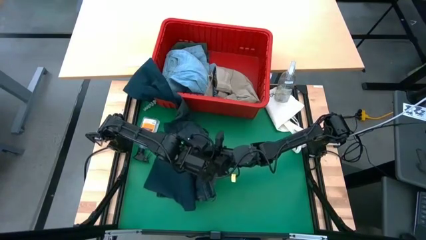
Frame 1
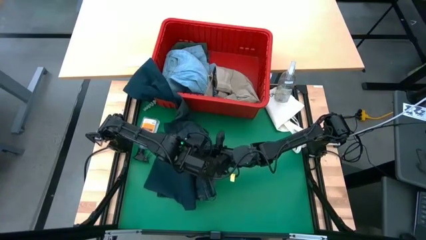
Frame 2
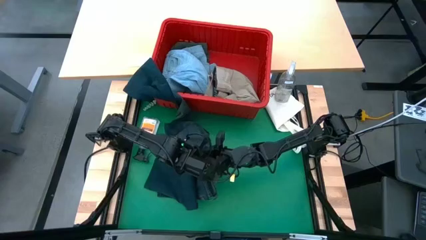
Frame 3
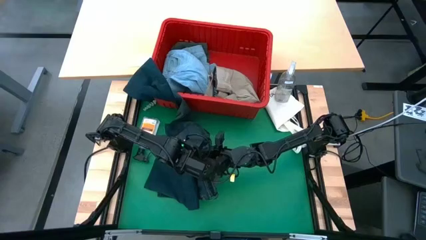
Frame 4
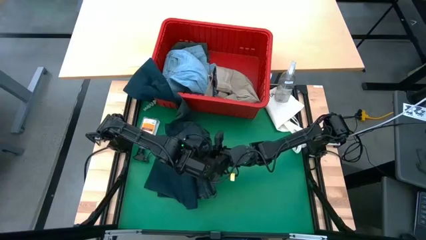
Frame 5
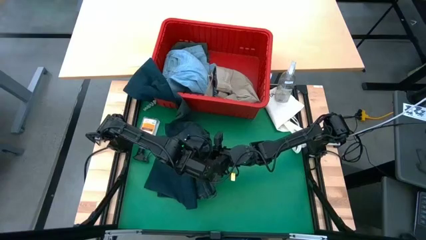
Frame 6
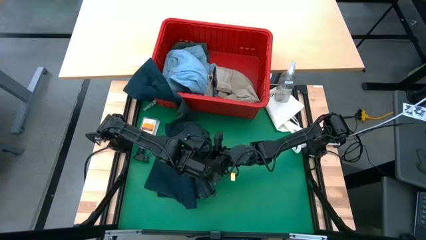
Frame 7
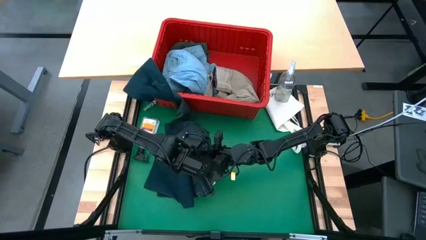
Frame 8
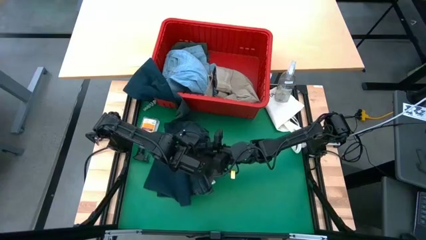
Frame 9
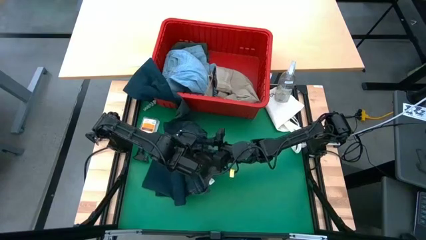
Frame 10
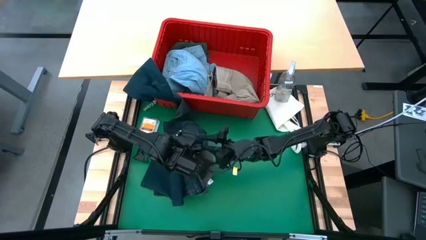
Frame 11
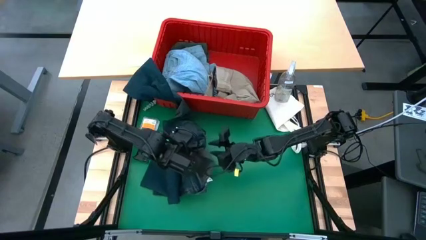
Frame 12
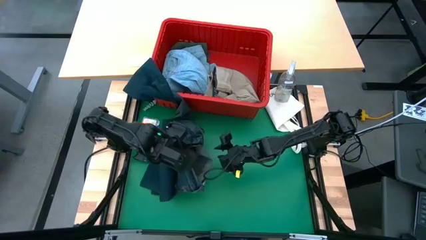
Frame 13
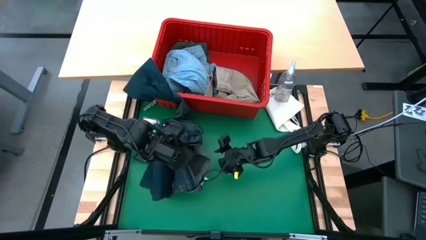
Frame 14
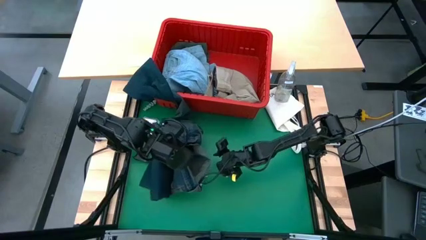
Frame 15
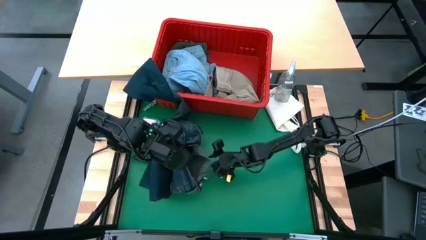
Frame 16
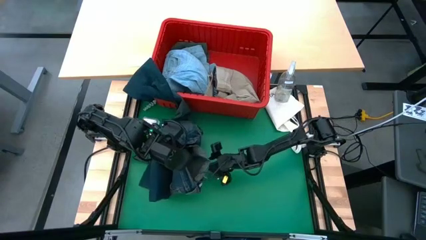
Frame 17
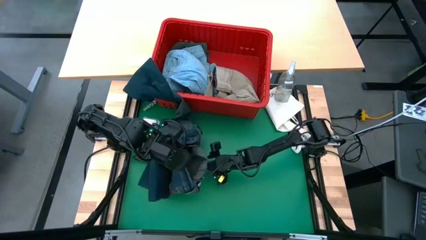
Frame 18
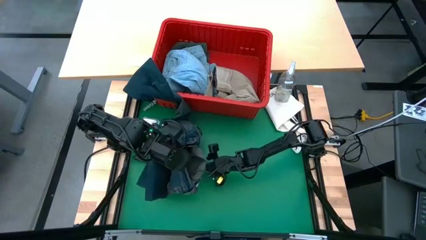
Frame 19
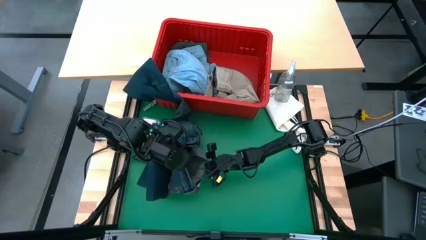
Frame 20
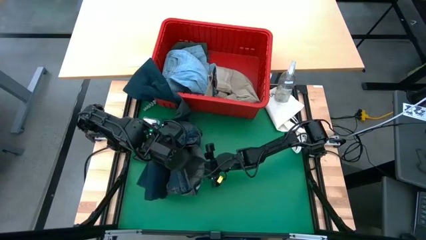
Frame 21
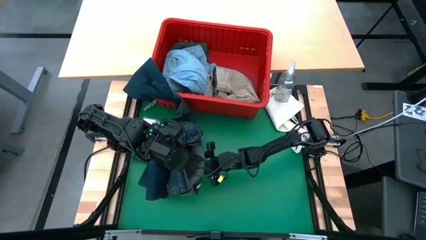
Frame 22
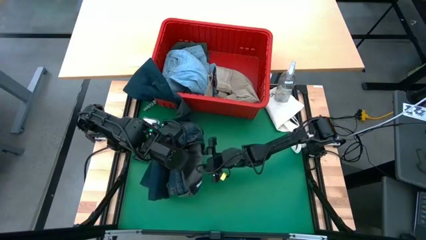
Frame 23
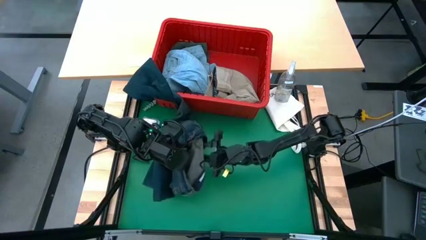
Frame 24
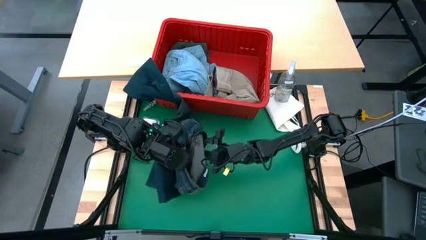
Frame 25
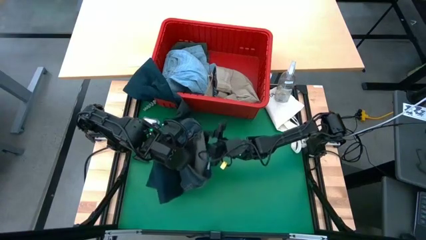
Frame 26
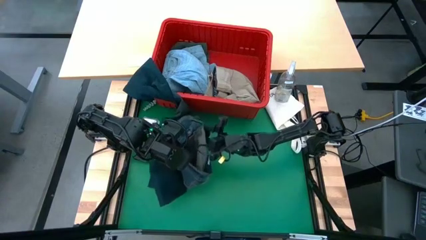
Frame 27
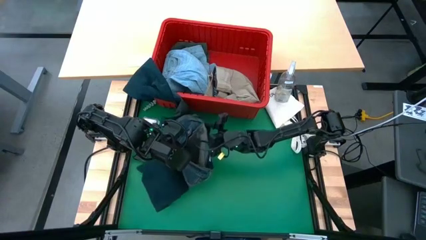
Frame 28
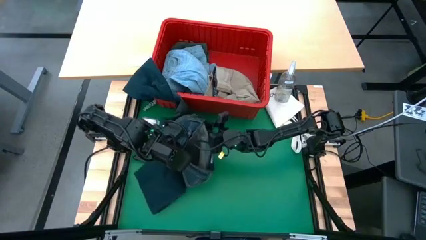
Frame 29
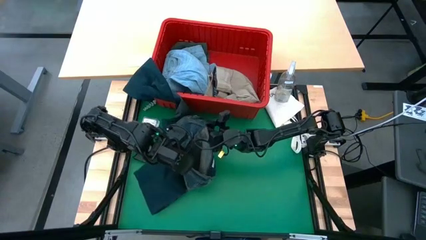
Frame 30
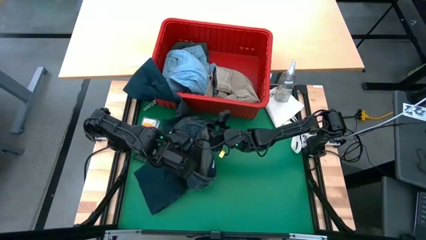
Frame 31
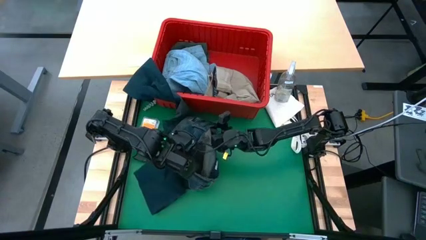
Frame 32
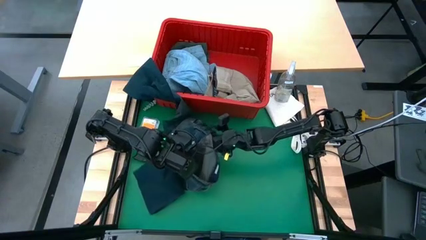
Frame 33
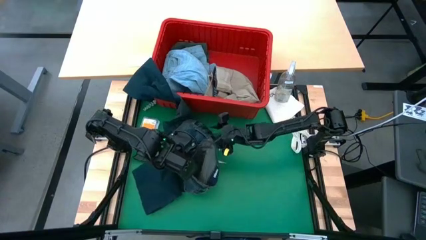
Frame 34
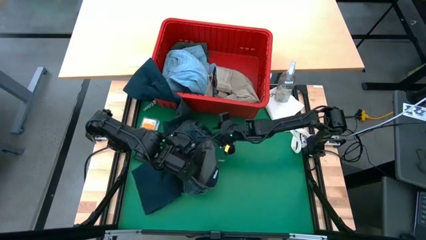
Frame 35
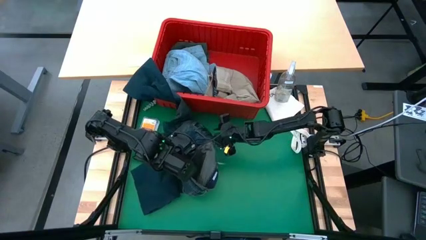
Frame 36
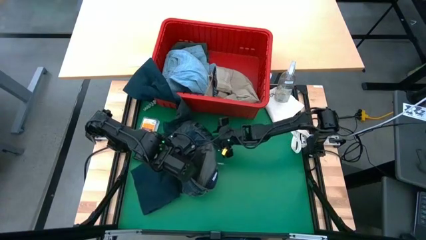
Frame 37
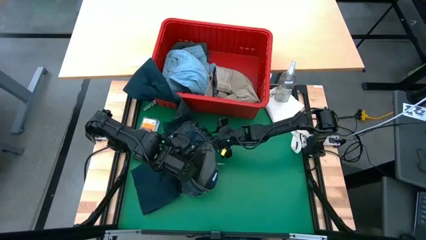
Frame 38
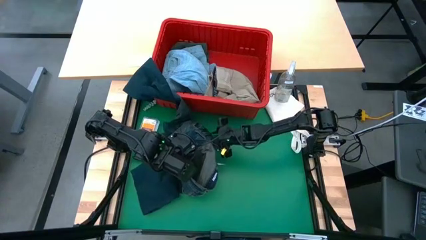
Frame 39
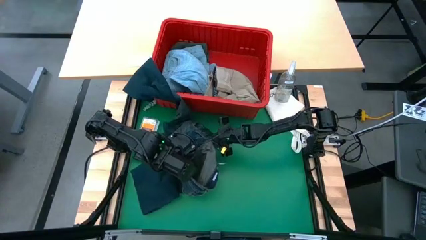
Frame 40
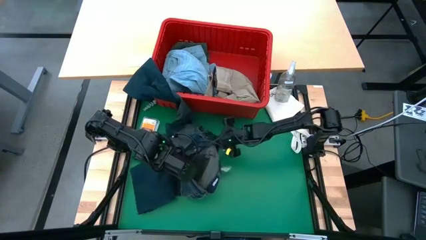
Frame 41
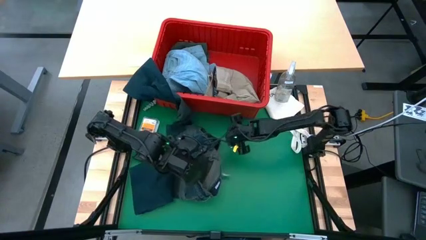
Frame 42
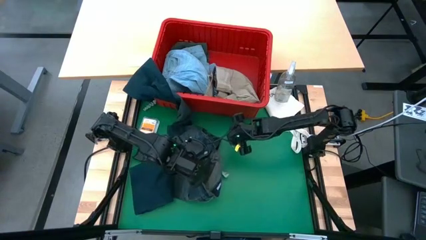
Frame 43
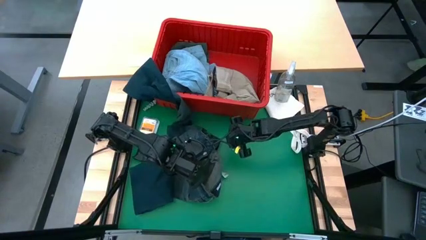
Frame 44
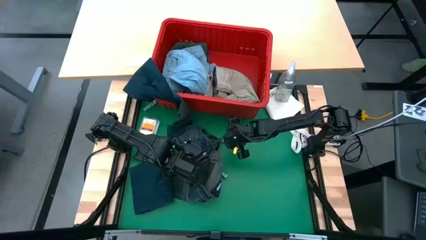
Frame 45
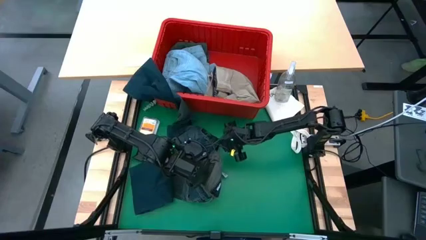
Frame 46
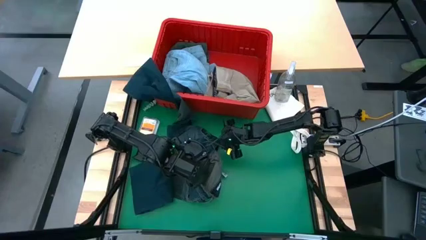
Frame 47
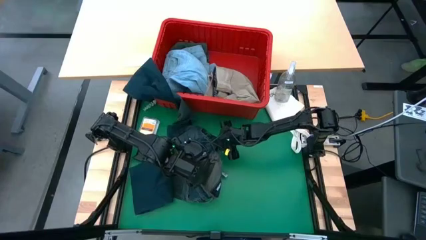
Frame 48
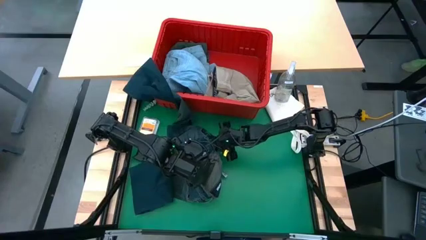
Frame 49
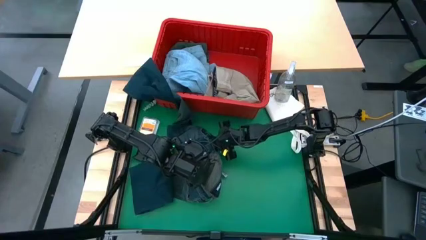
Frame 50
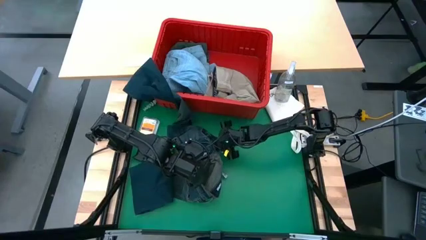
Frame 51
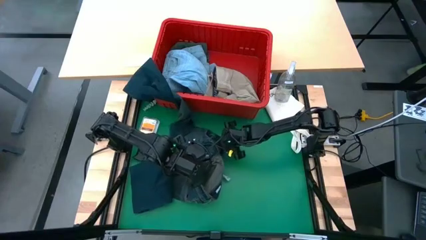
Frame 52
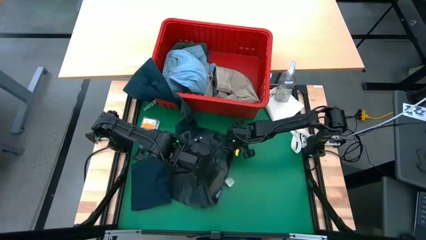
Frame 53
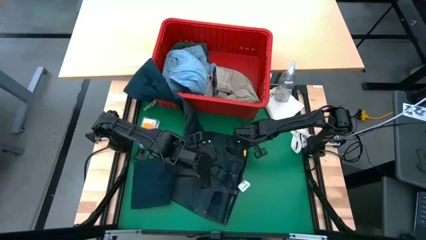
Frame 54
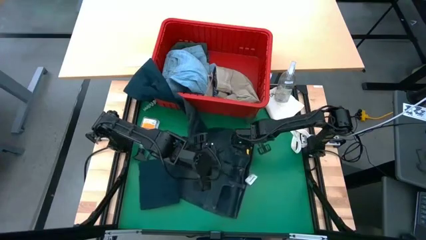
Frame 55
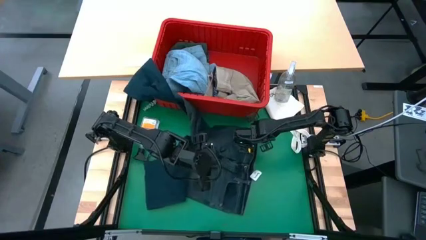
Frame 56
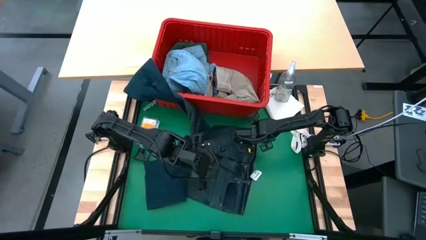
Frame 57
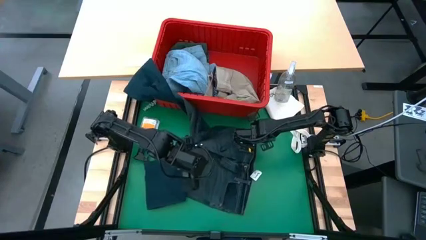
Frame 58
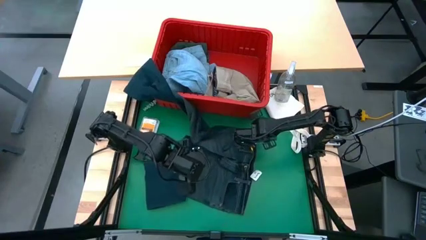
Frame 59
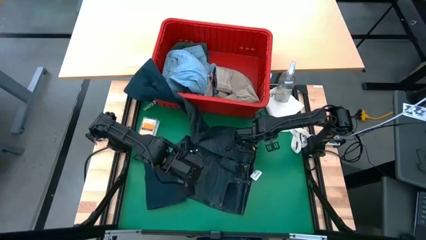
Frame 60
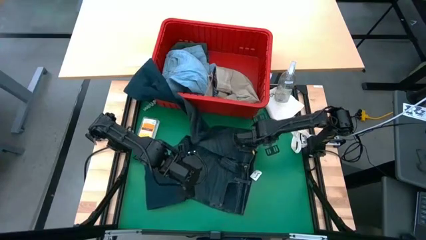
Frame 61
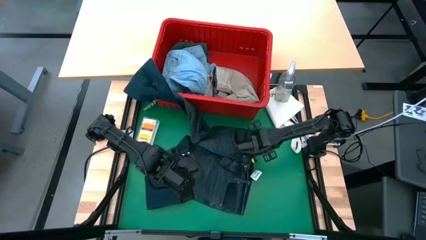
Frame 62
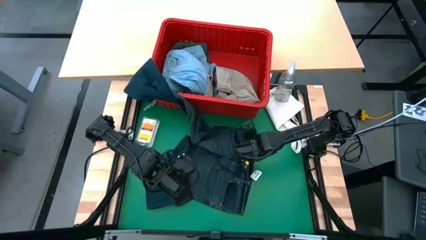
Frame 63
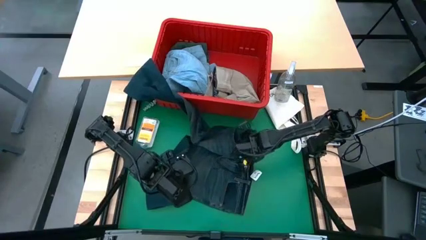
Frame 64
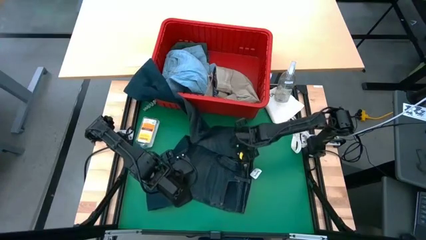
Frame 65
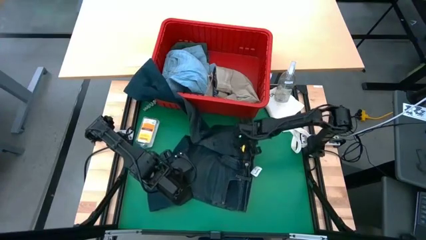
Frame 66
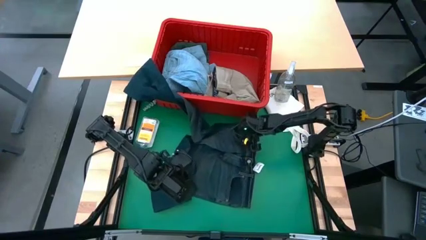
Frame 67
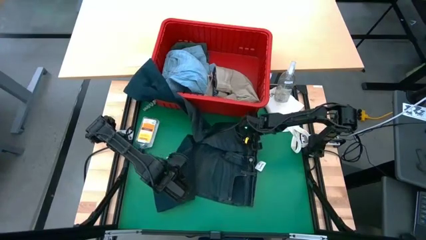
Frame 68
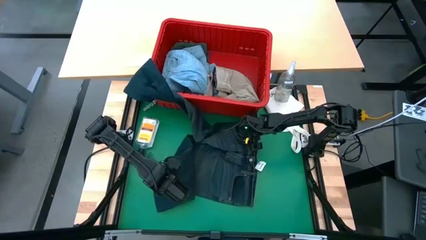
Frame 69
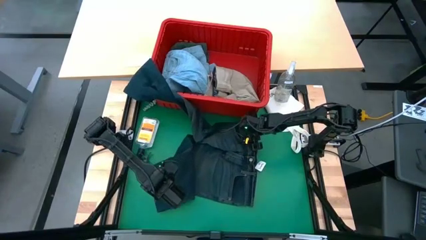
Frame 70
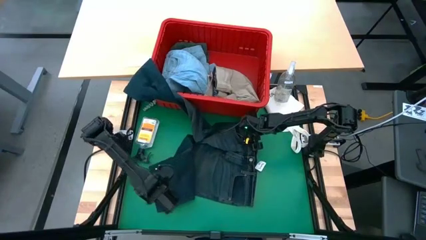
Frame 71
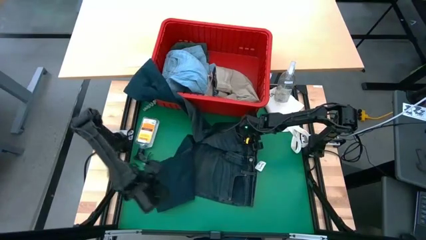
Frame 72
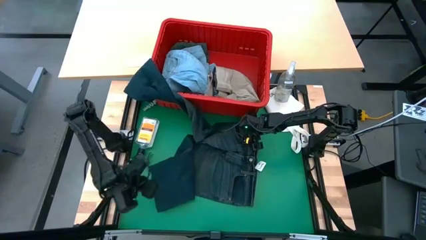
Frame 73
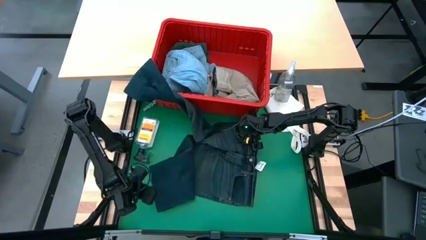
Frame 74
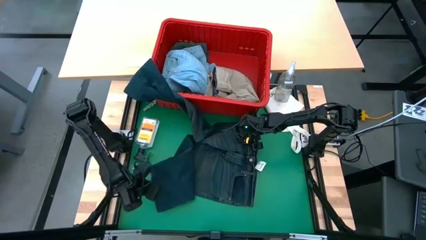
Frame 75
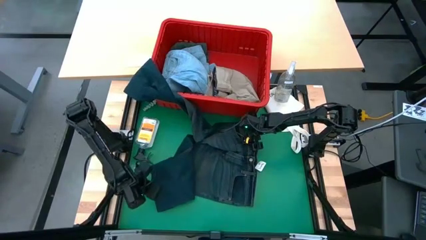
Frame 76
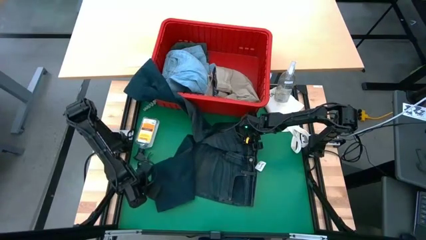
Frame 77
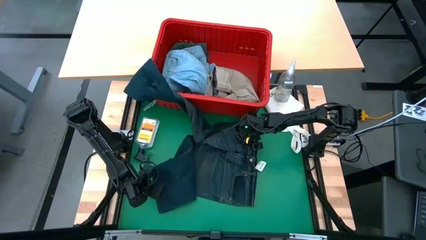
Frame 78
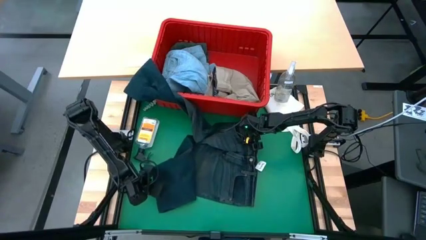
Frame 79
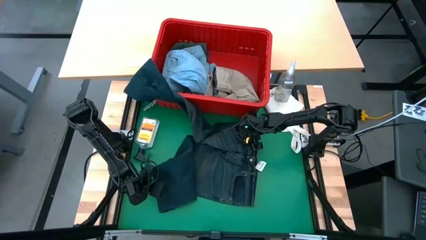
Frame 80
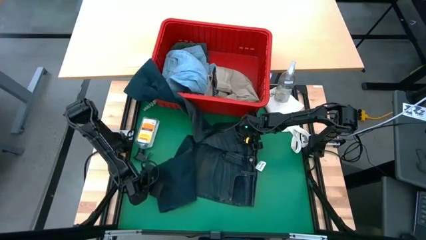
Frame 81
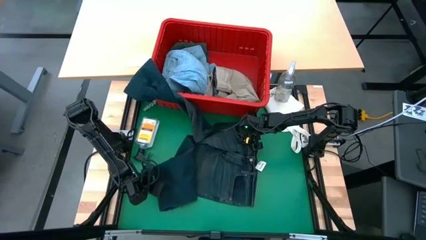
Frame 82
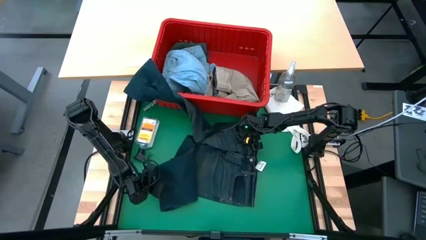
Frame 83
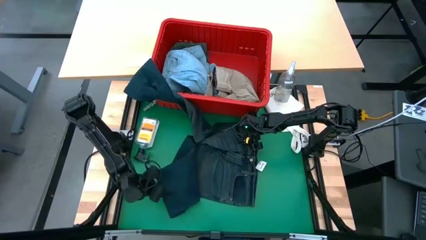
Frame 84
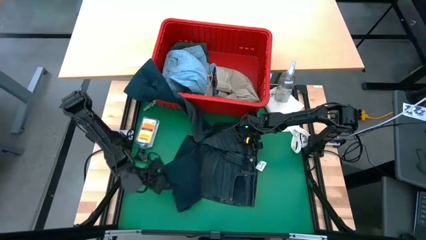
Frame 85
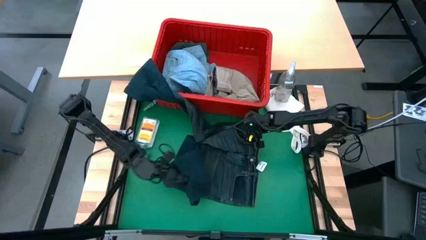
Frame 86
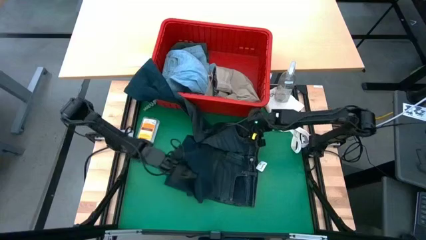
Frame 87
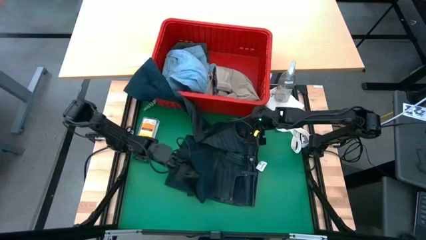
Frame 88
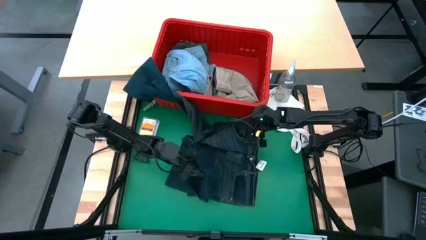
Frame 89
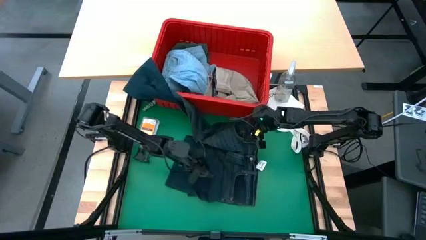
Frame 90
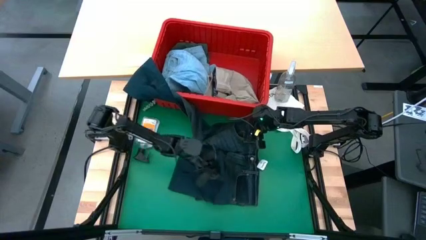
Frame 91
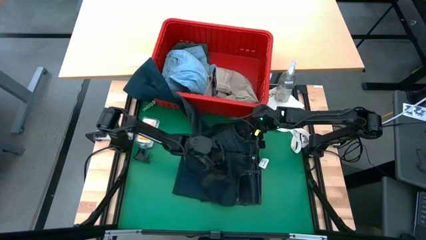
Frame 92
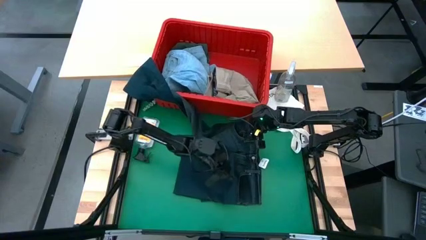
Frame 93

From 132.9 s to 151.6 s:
Task: Fold laundry
Fold the dark blue jeans
